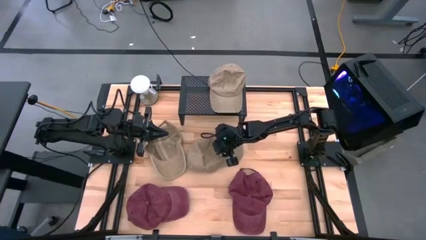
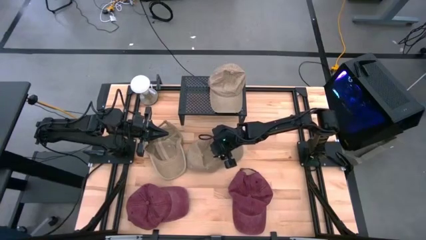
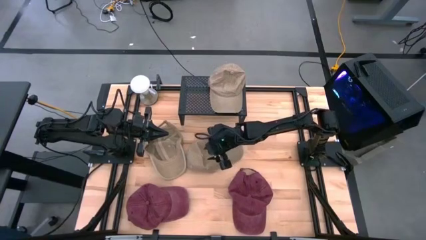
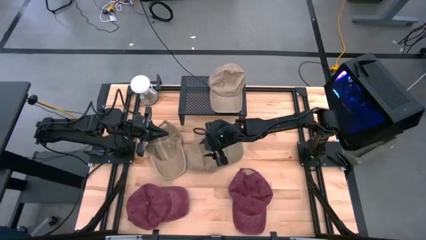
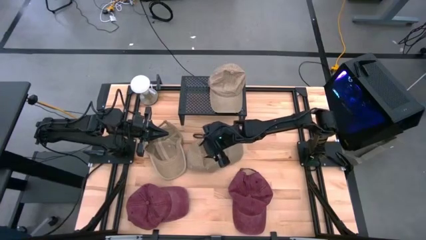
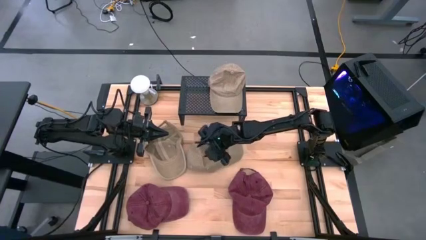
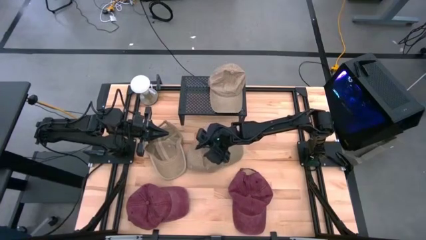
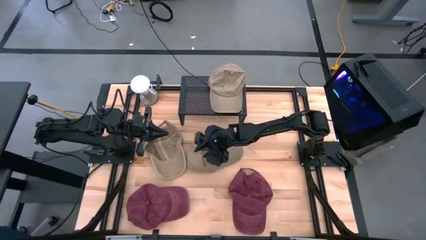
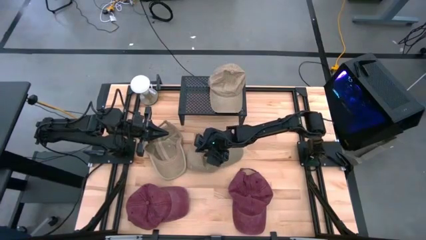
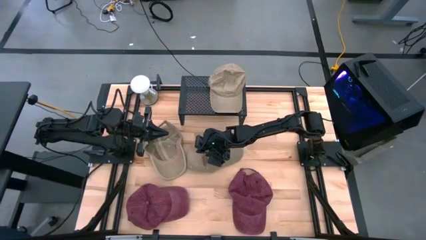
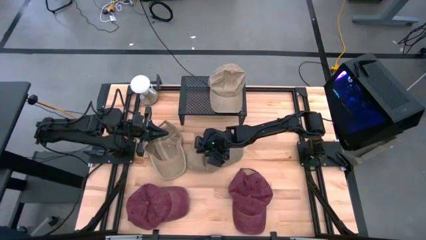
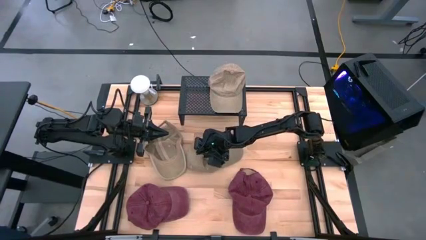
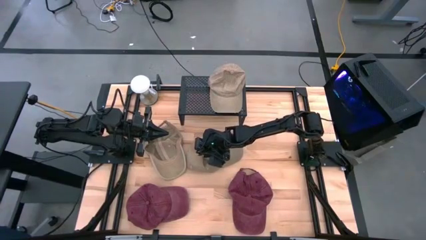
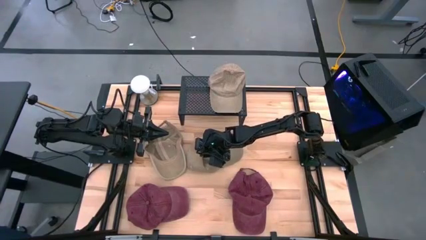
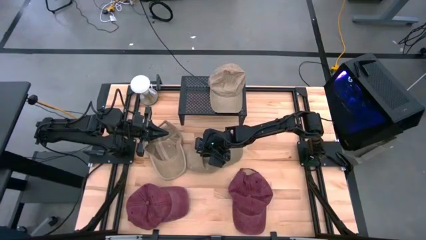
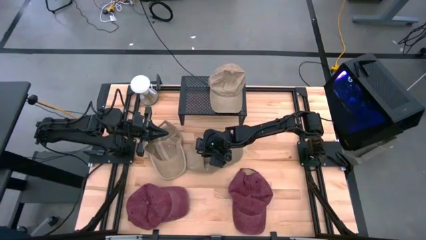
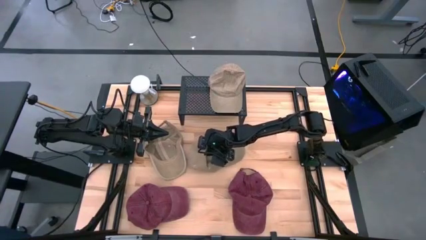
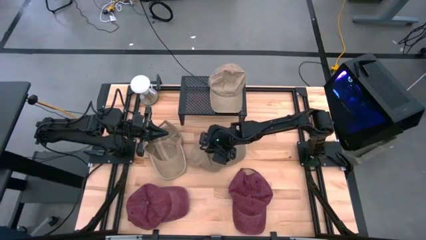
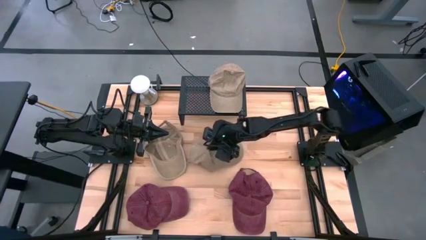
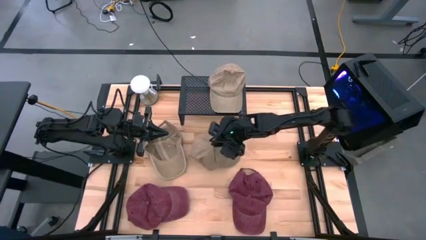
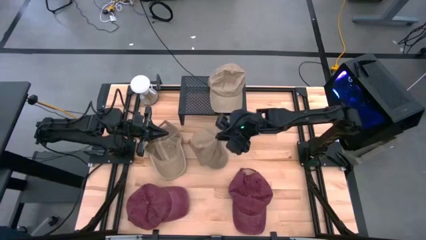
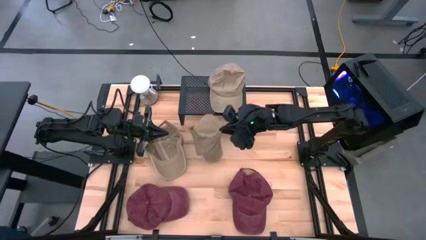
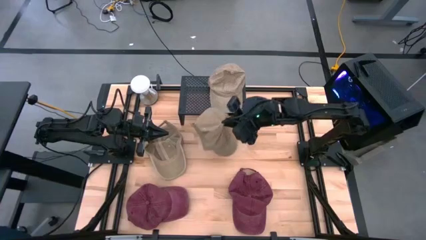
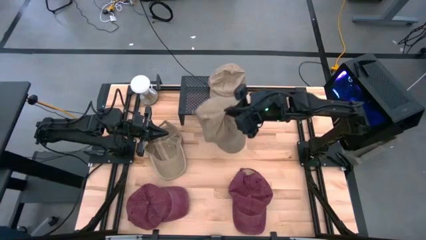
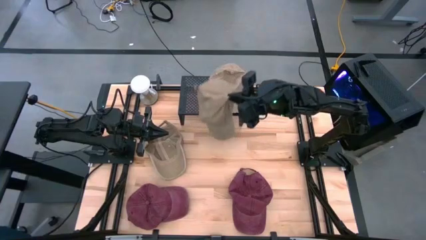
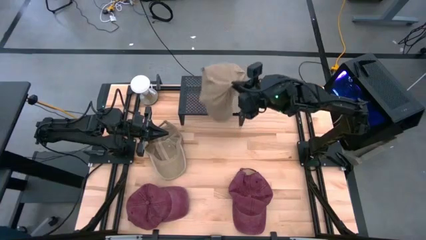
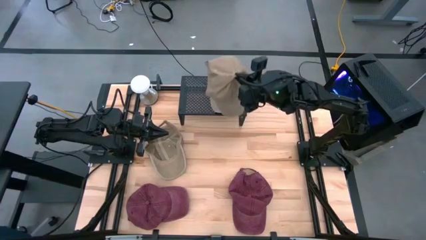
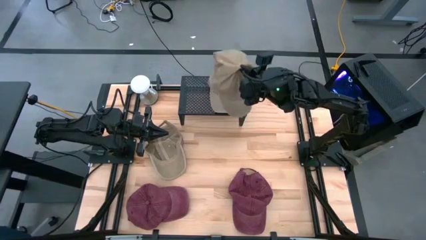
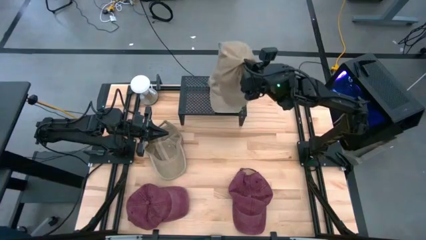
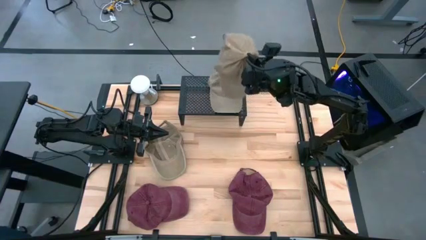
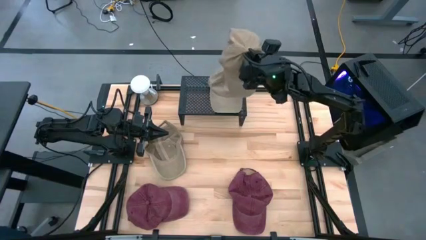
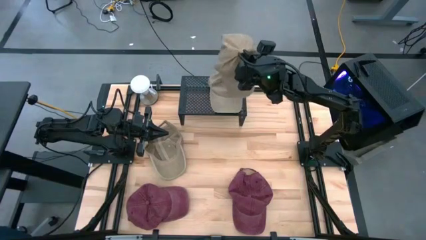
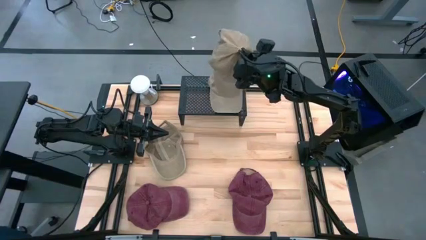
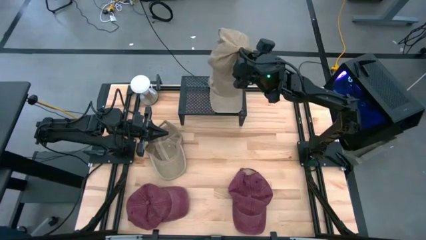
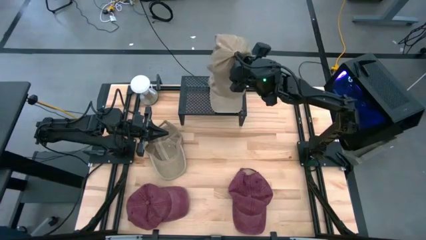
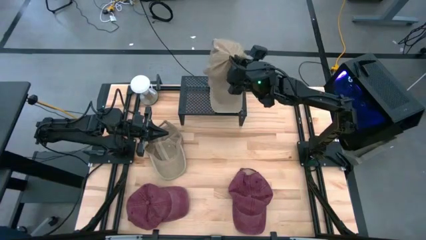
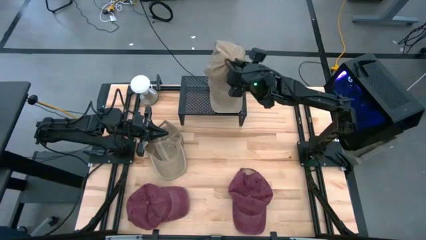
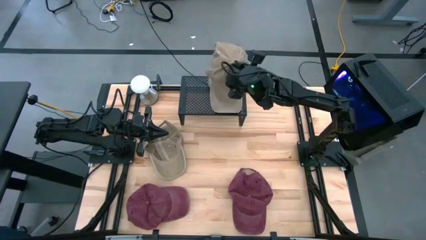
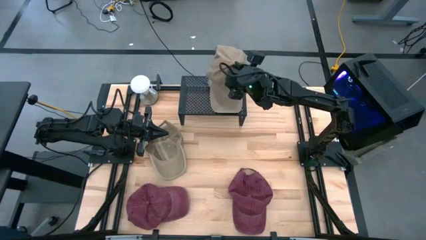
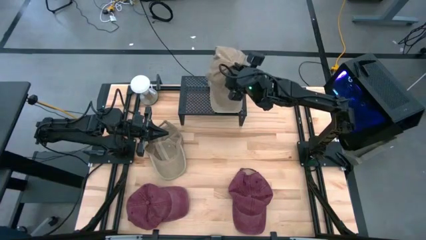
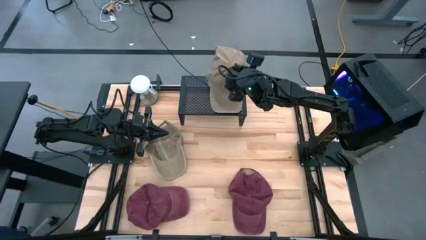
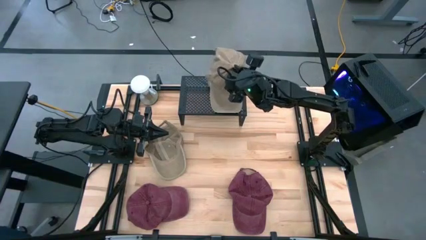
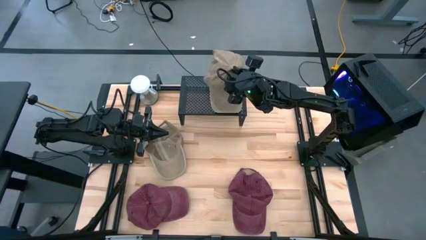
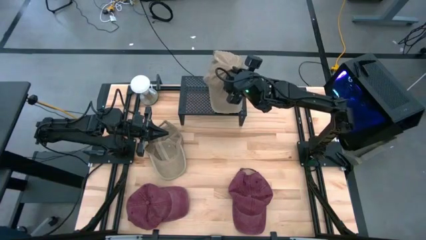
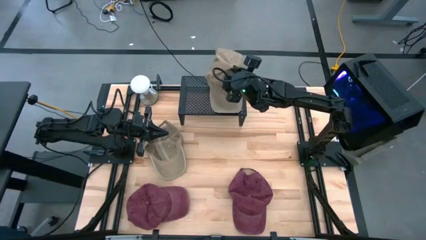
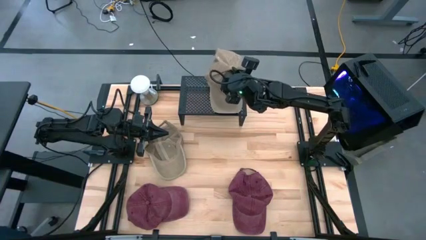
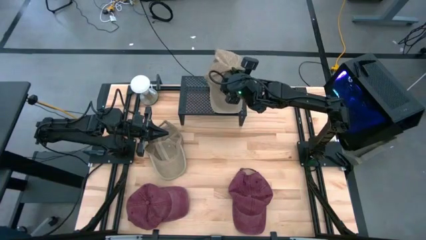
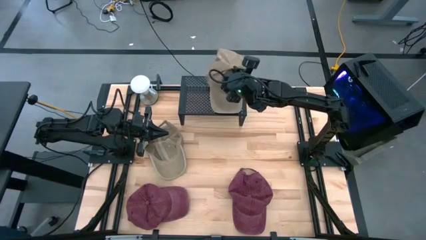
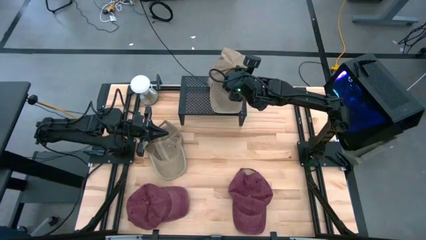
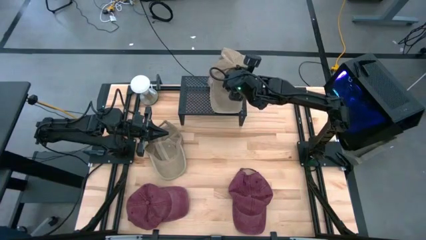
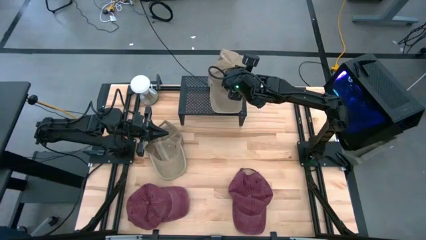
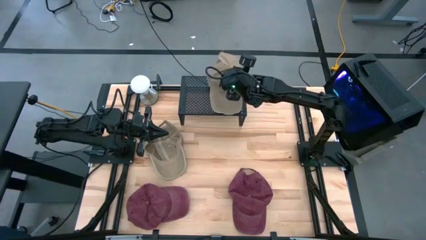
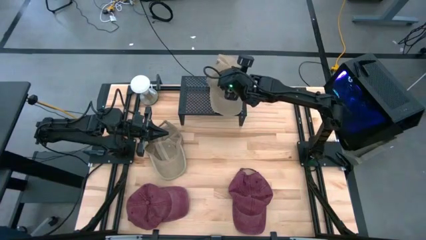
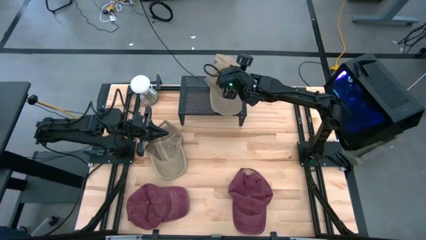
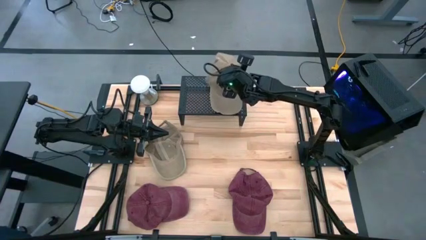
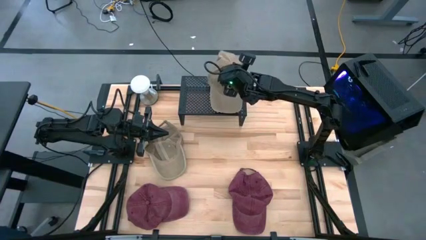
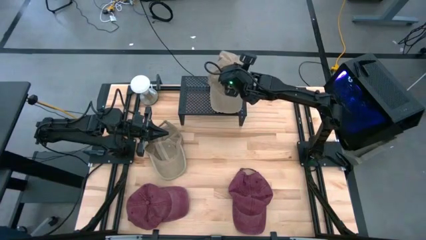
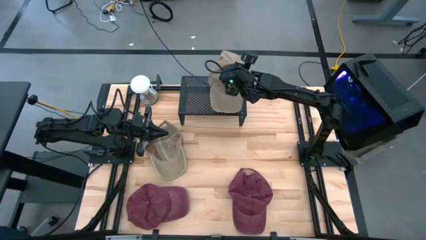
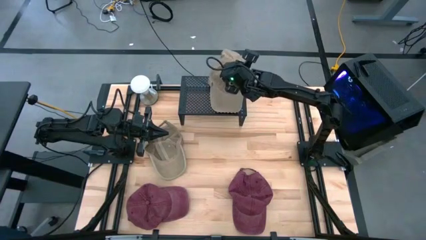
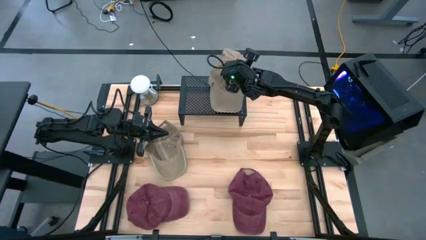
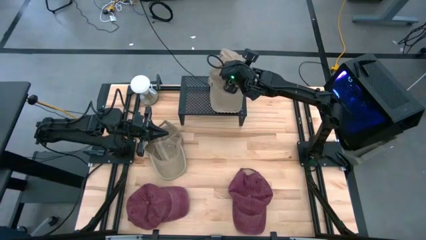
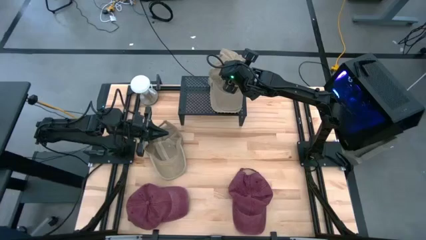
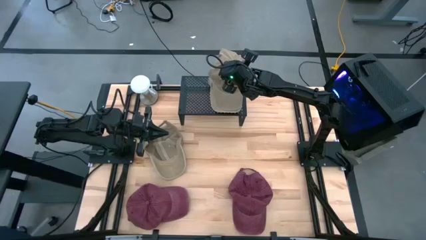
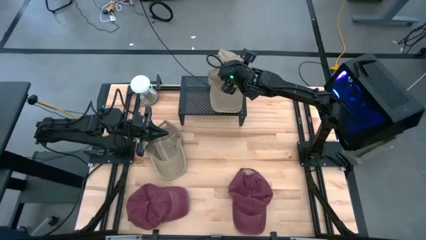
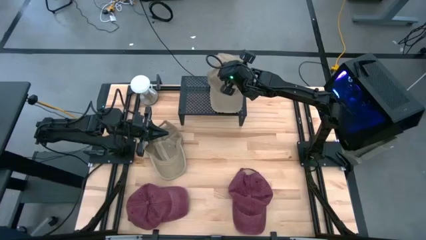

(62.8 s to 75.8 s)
Task: Pick & Place hat
Stack the right brown cap on the brown cap on the shelf
